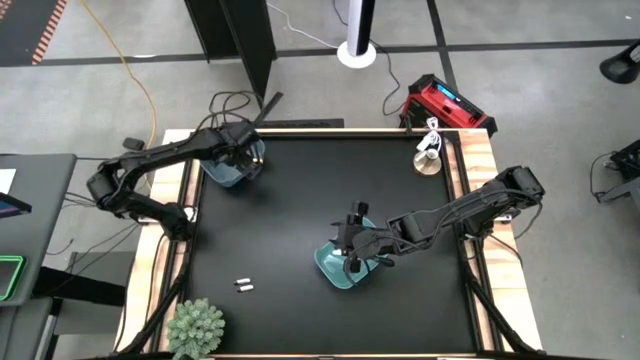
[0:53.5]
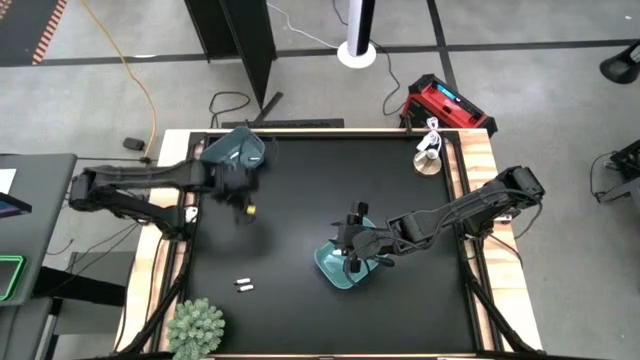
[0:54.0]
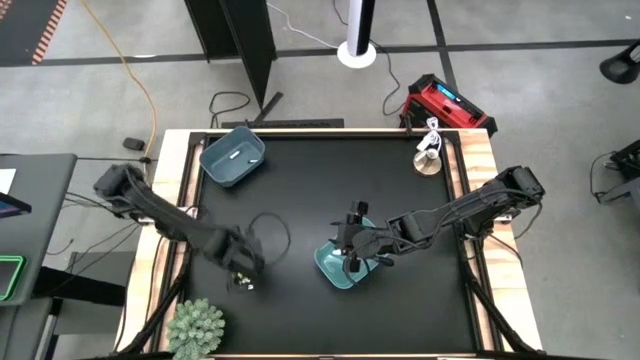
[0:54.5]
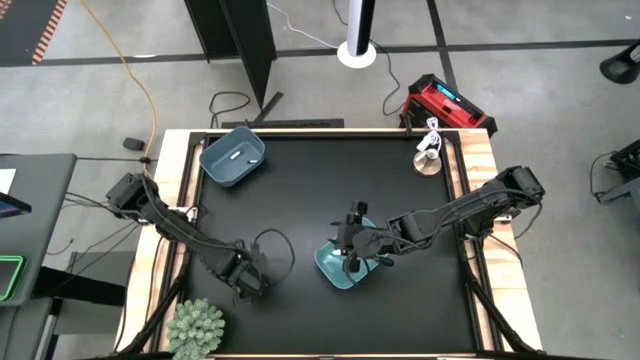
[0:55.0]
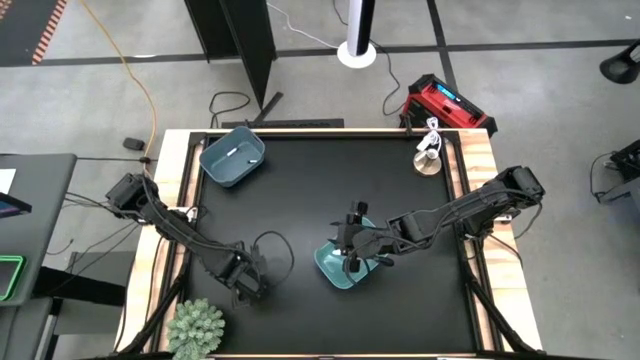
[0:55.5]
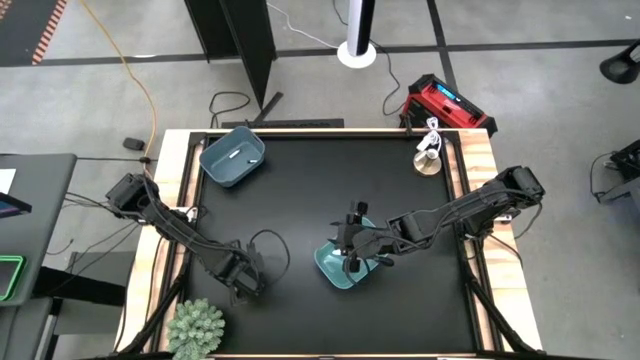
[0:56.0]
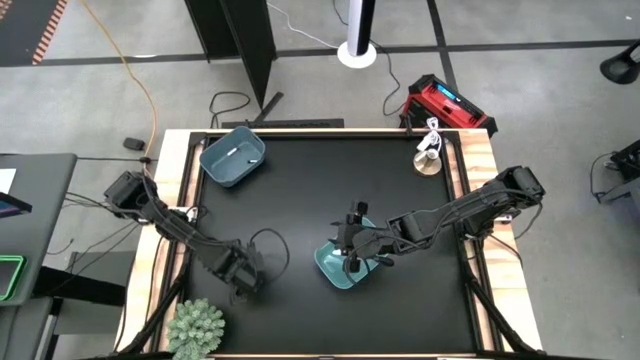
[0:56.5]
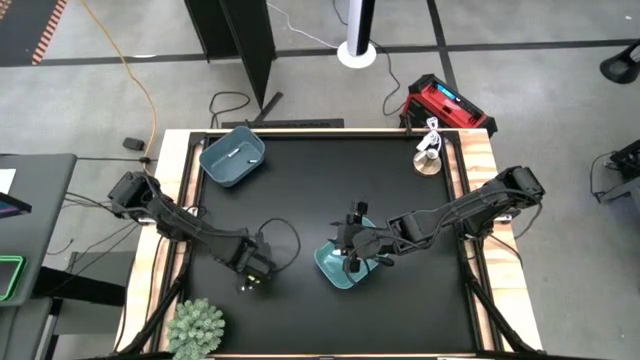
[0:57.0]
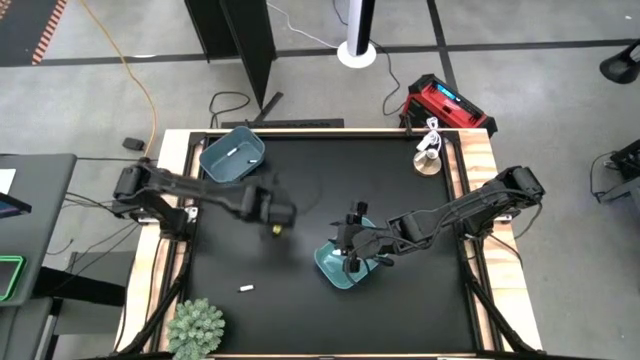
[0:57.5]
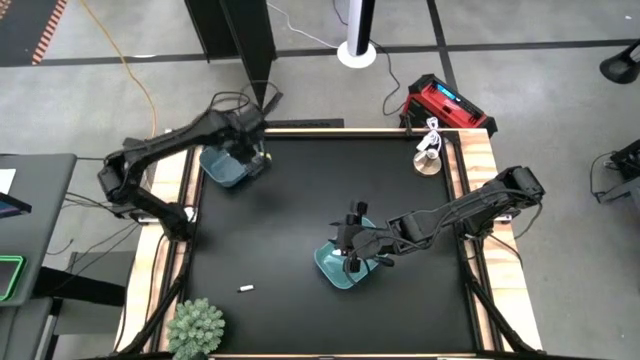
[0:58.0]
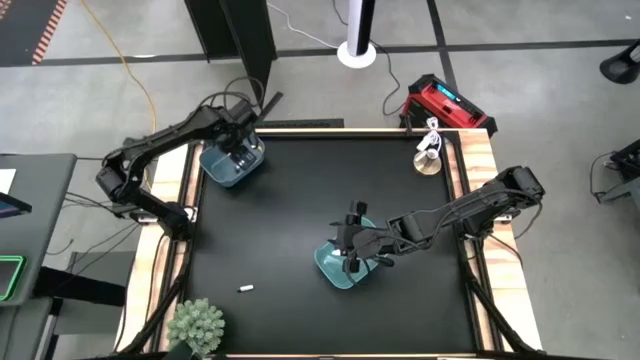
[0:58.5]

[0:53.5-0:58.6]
Task: Sort batteries
Put the silver battery into the blue bin

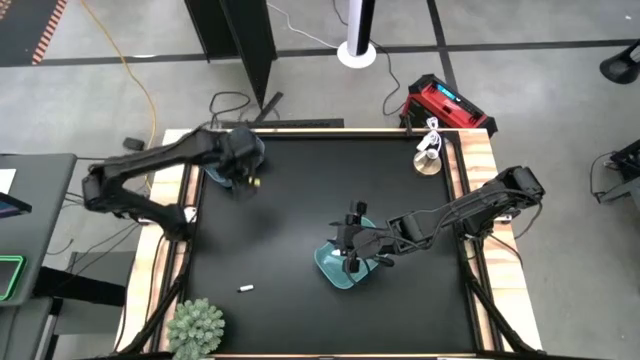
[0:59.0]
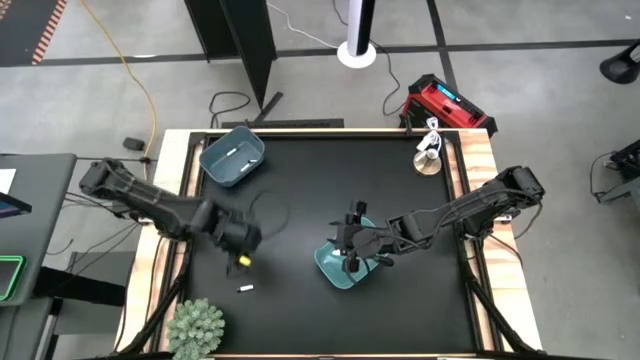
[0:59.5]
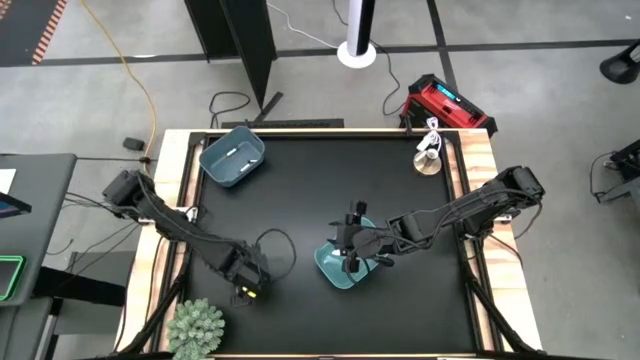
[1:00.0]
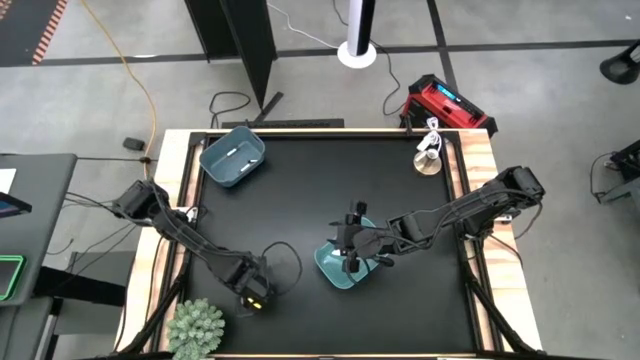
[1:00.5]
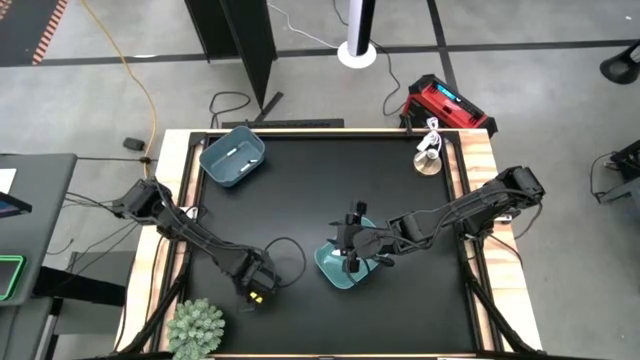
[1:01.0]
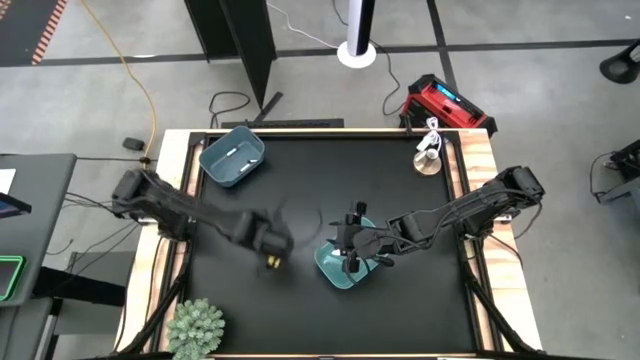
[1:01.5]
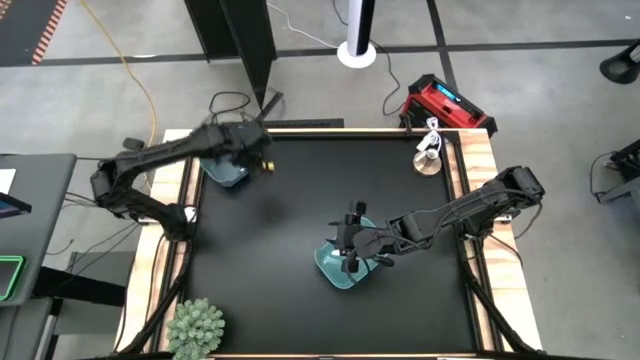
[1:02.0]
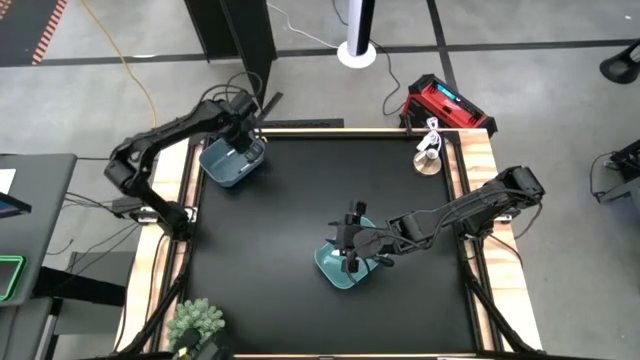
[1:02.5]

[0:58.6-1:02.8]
Put the silver battery into the blue bin

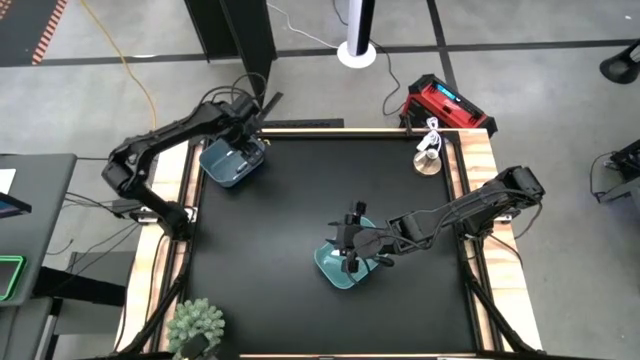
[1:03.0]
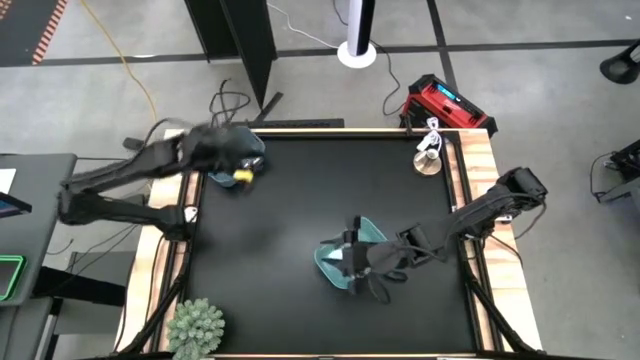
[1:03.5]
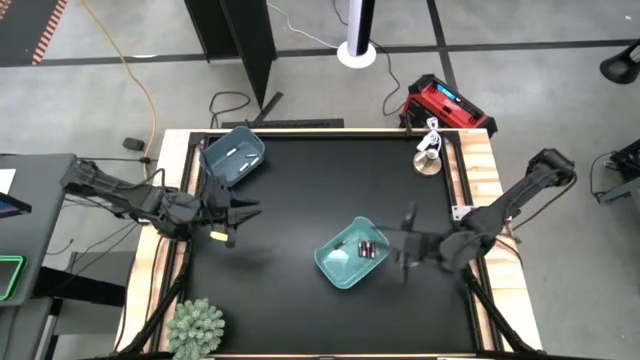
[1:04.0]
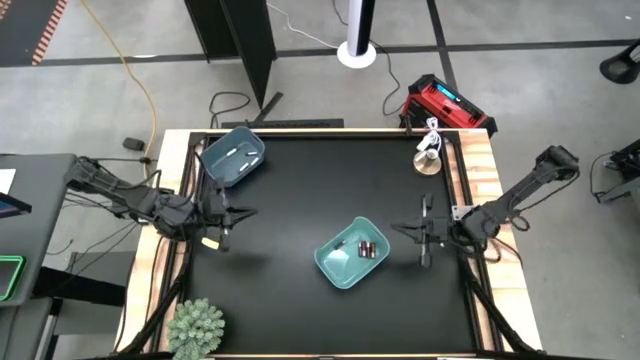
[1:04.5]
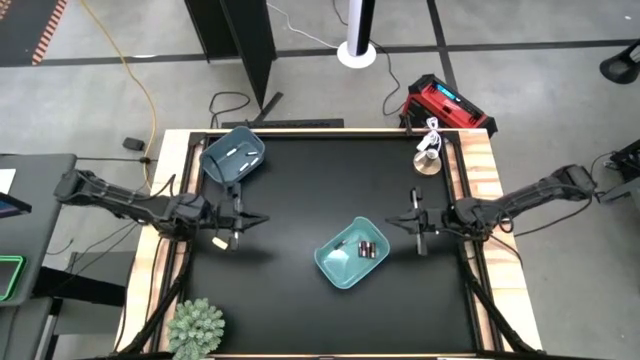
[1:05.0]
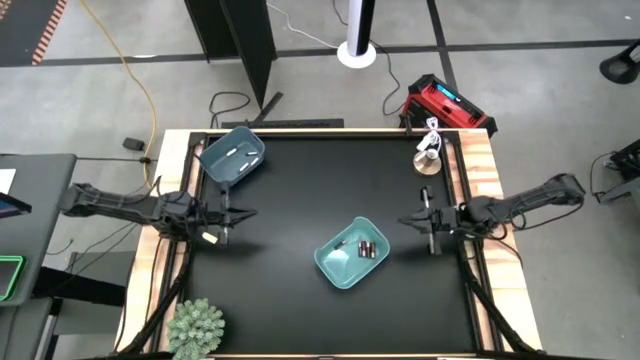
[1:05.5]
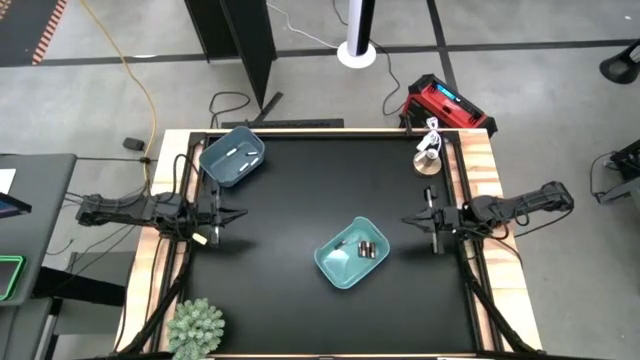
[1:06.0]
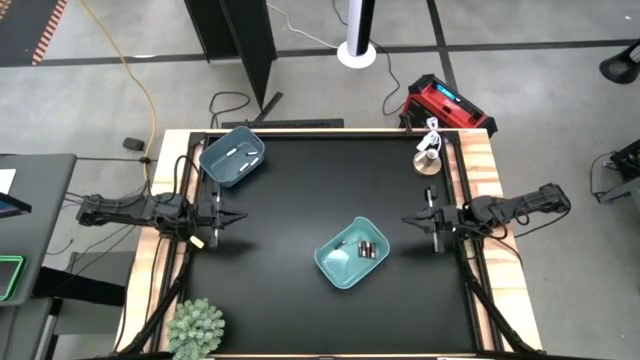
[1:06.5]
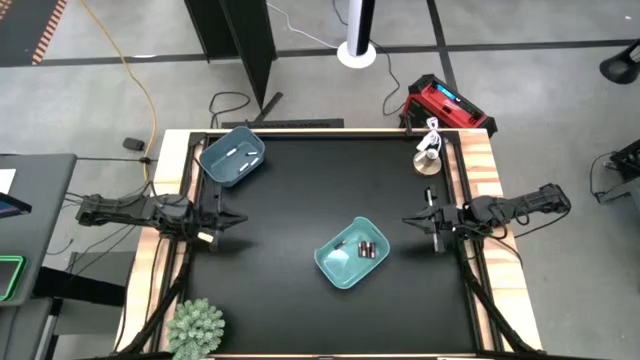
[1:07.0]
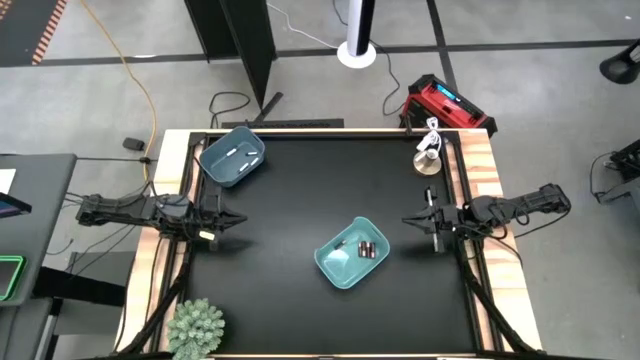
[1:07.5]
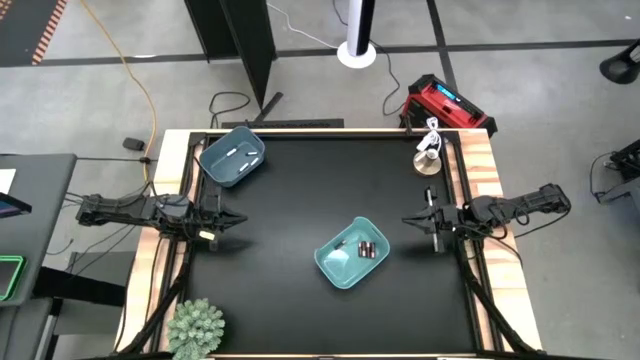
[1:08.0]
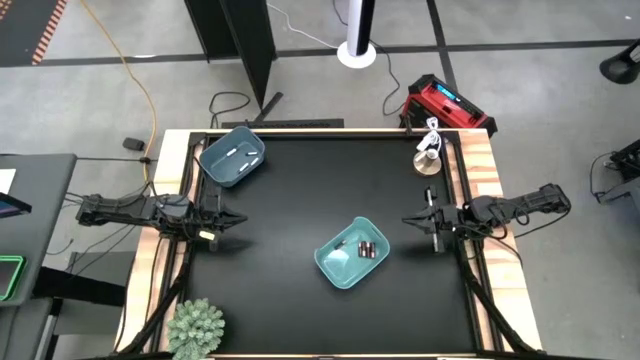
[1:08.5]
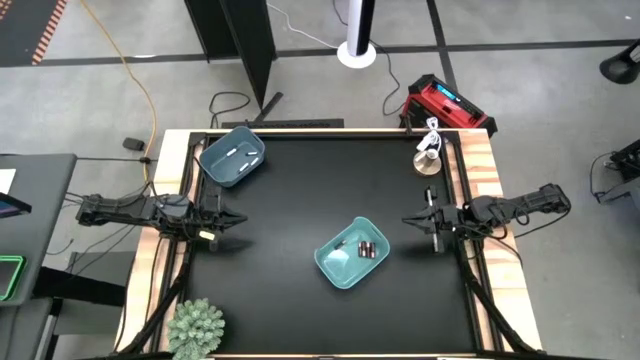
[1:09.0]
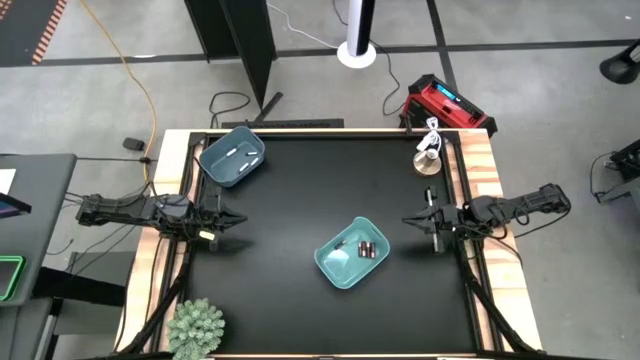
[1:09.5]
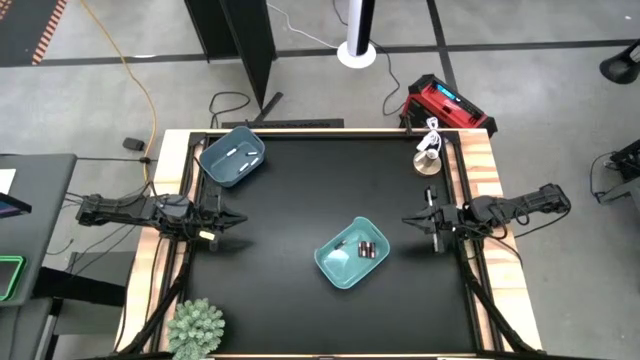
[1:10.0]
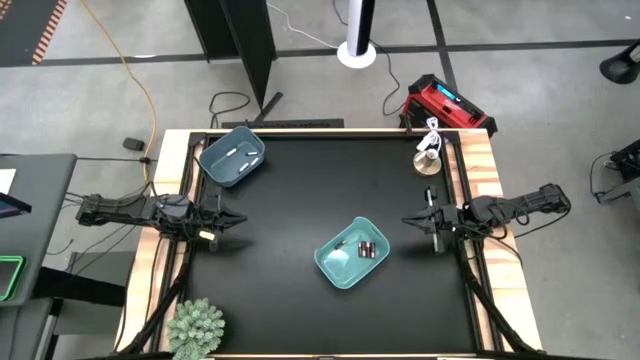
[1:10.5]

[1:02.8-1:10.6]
Return to Home Position

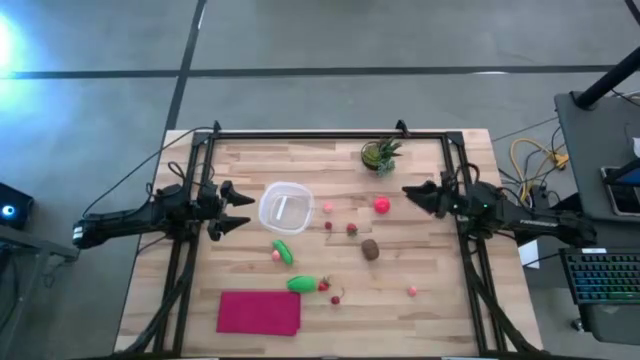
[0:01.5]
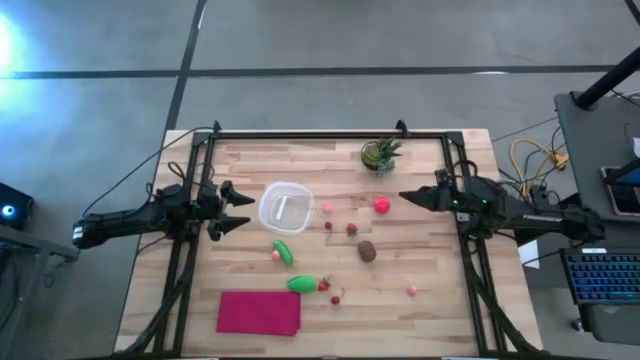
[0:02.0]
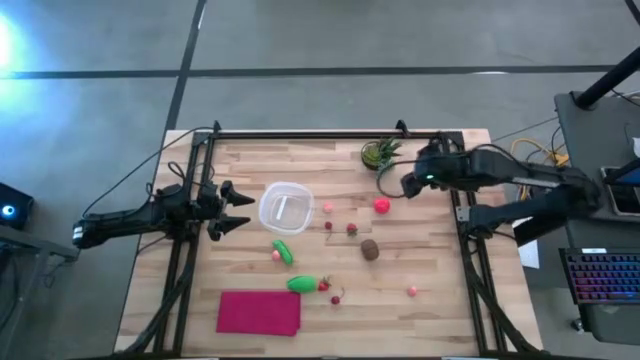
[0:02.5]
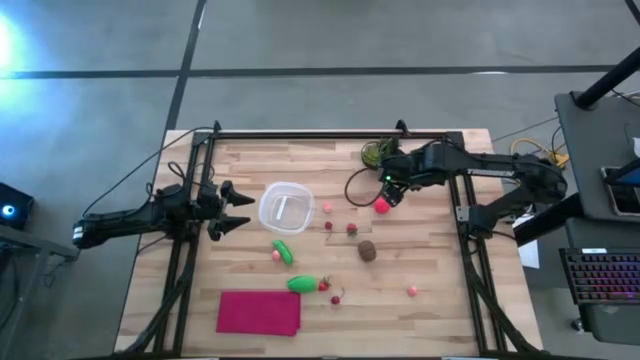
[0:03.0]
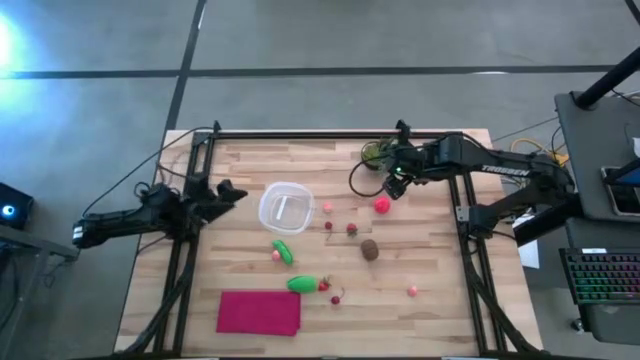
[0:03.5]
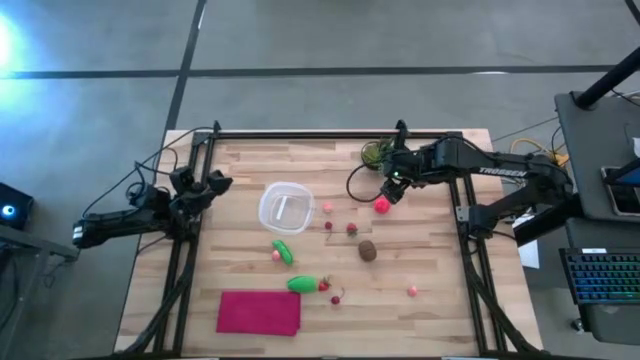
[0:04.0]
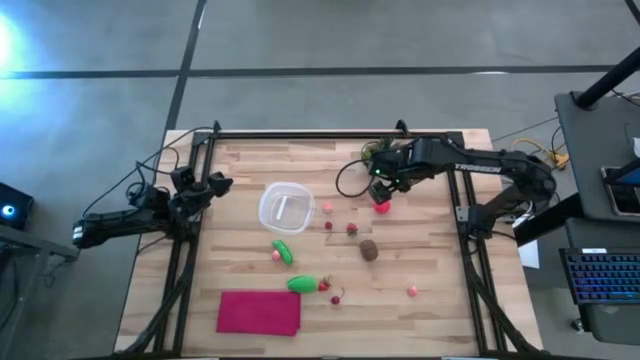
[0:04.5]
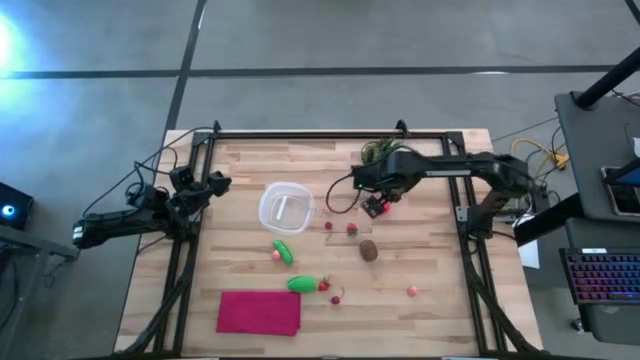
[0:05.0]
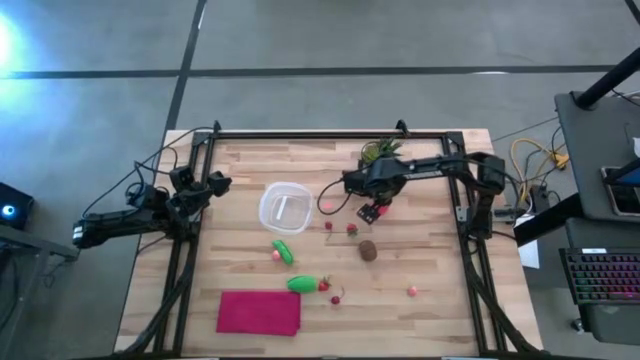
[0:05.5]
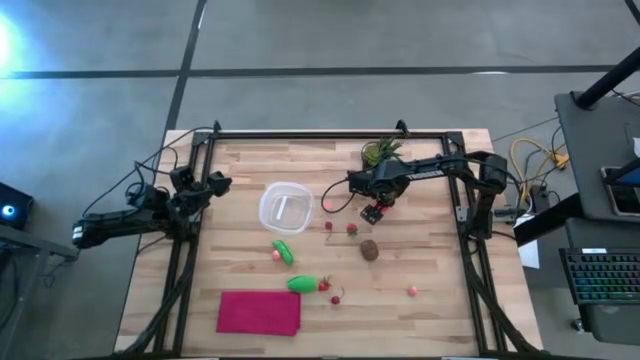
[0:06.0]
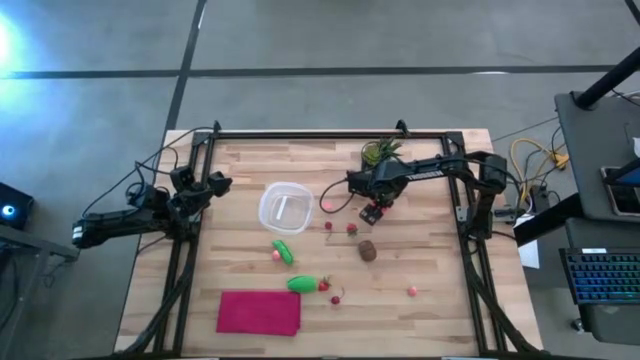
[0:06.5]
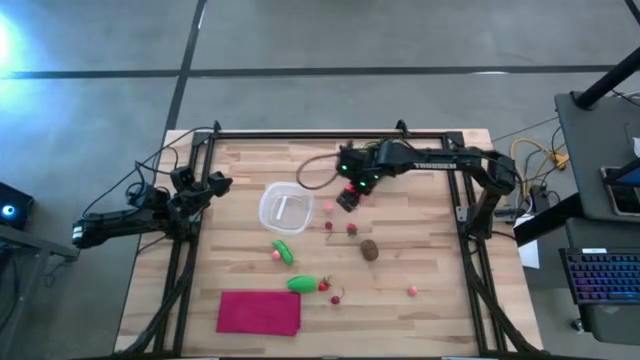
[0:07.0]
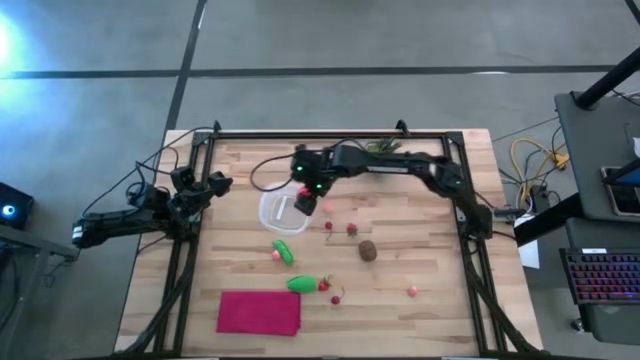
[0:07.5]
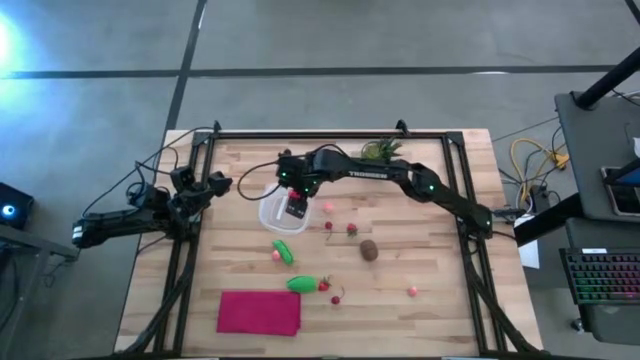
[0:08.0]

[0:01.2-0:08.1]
Task: Pick and placing Produce into tupperware
Put the red tomato into the transparent bin
